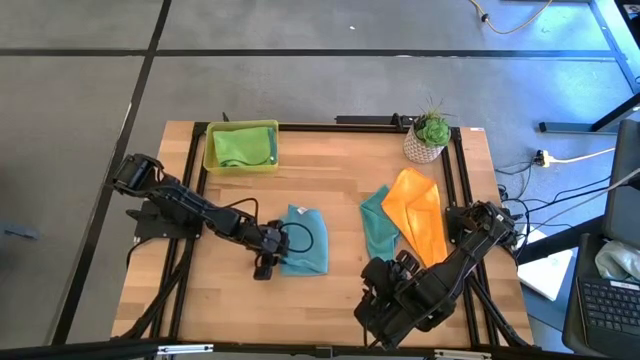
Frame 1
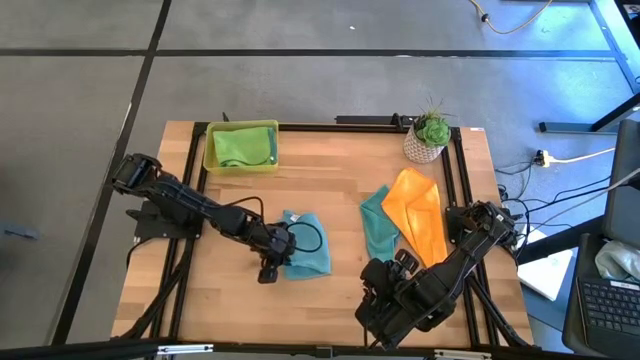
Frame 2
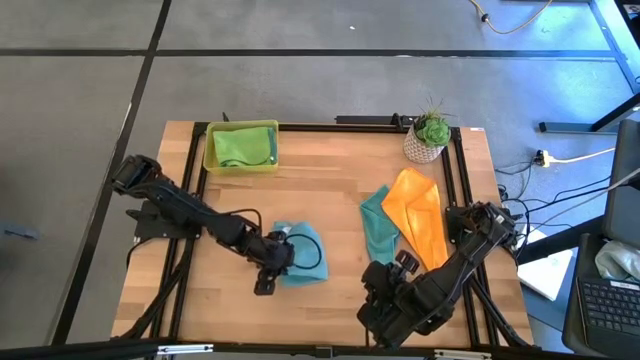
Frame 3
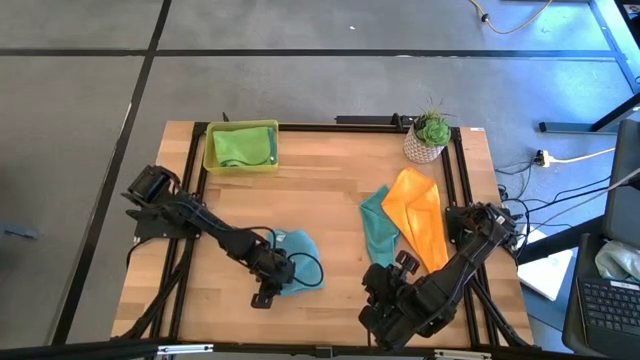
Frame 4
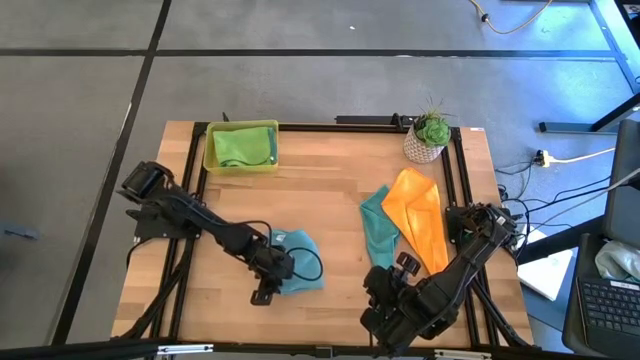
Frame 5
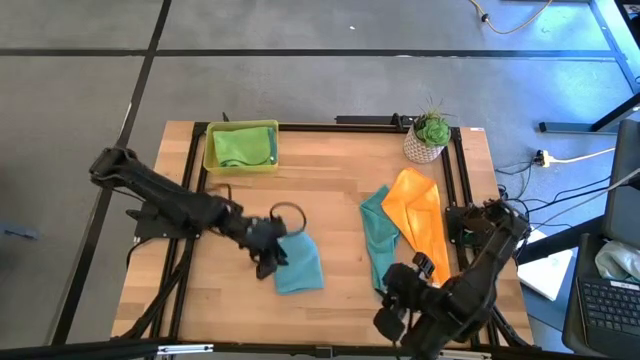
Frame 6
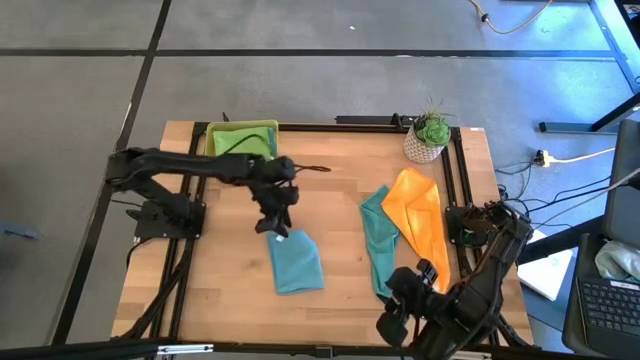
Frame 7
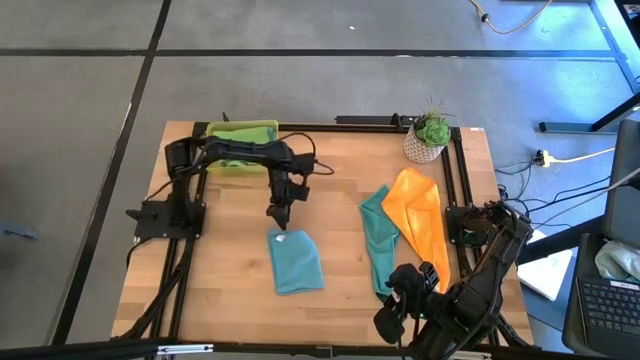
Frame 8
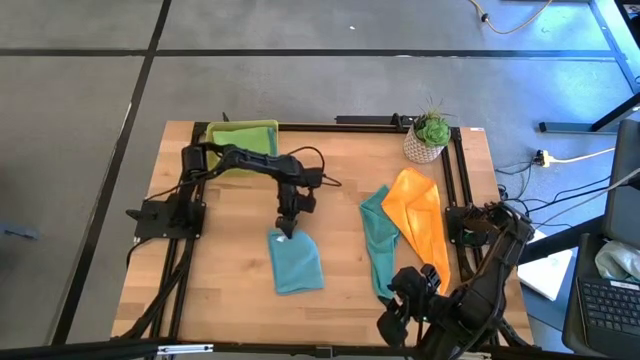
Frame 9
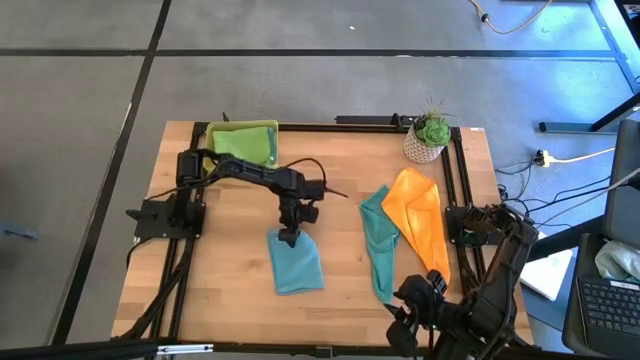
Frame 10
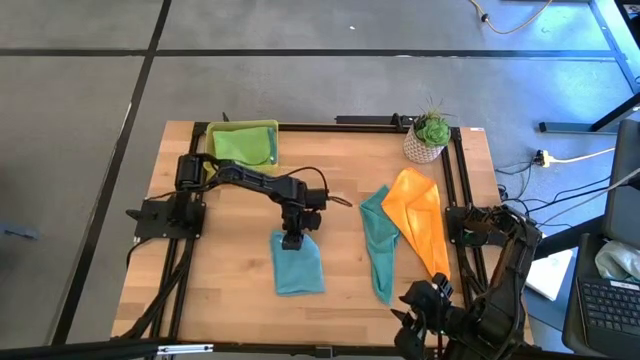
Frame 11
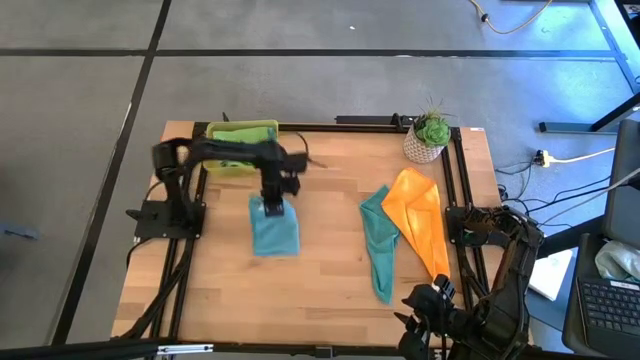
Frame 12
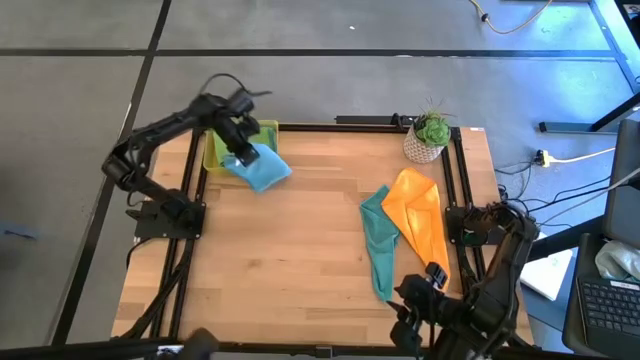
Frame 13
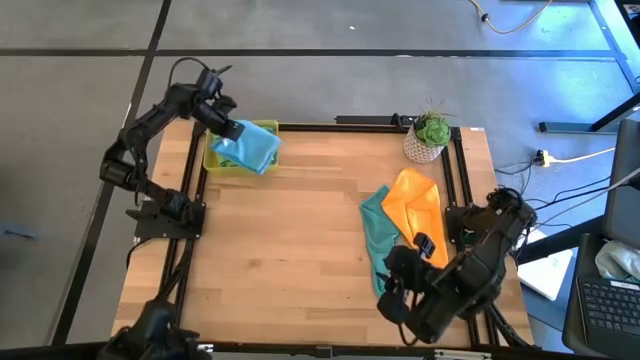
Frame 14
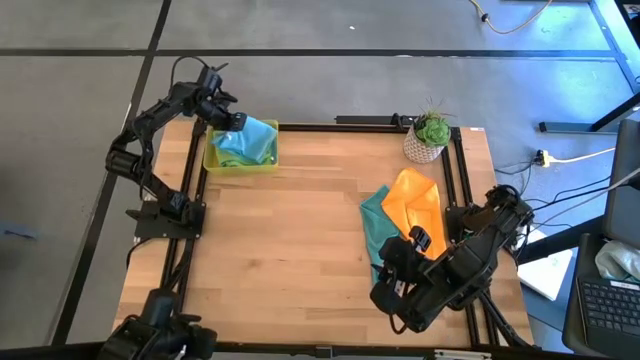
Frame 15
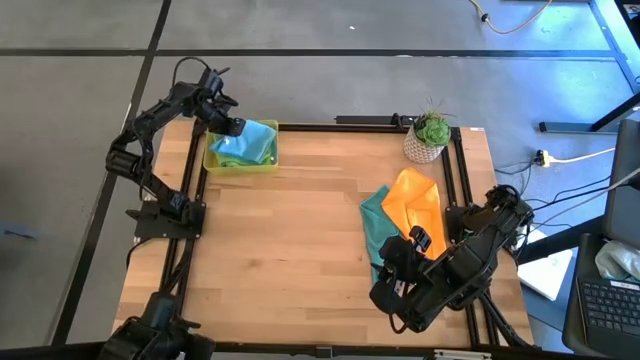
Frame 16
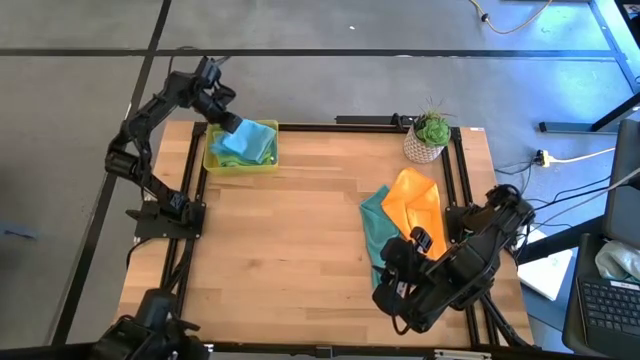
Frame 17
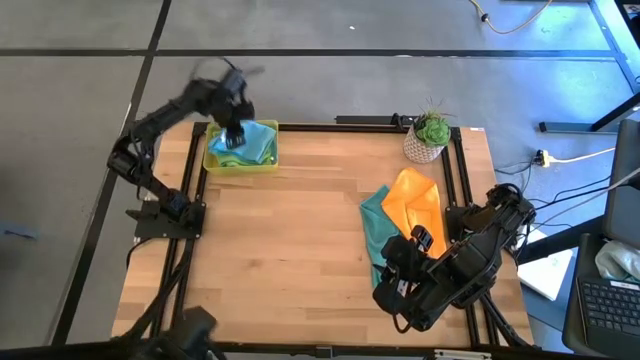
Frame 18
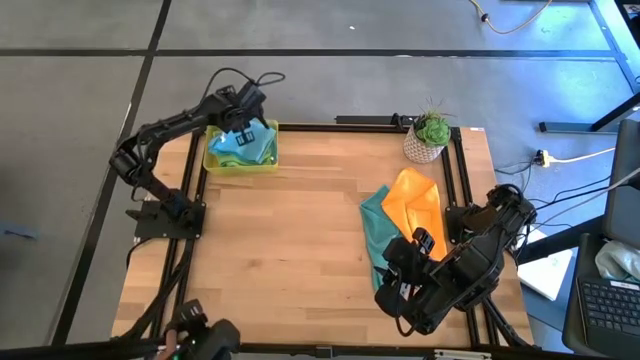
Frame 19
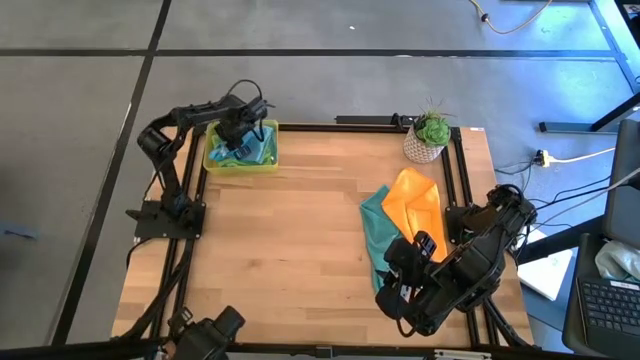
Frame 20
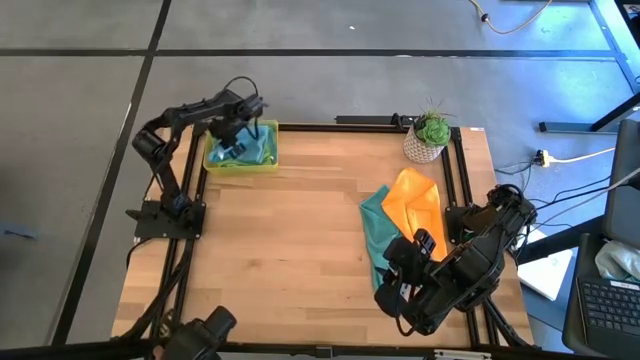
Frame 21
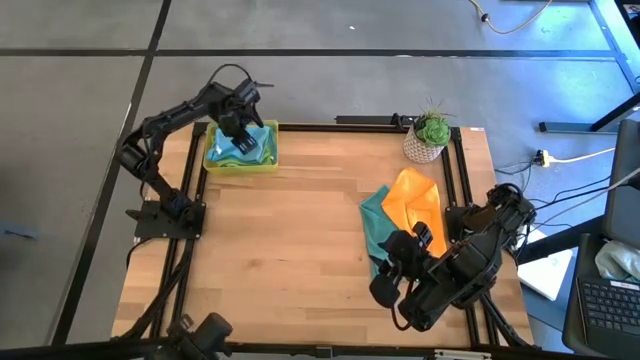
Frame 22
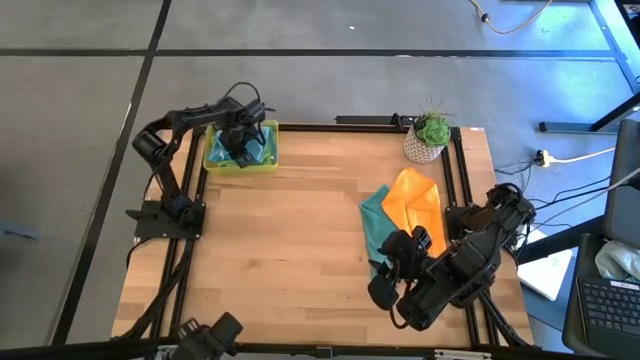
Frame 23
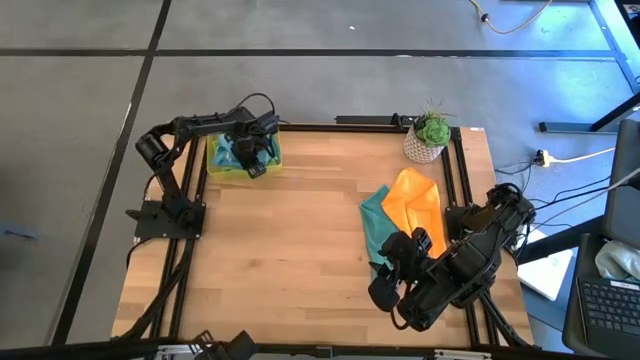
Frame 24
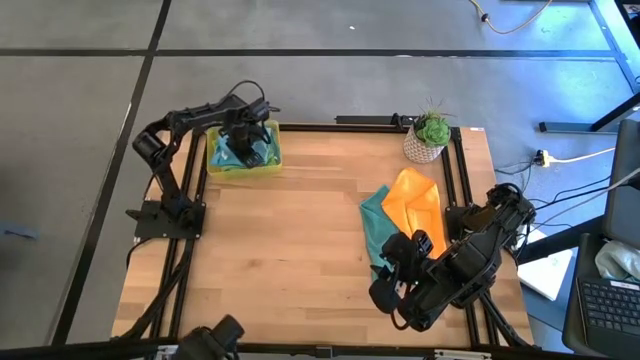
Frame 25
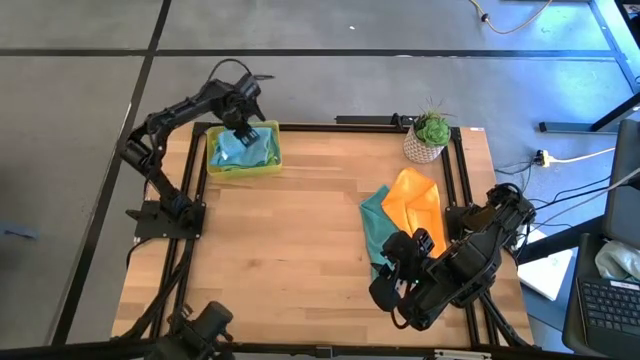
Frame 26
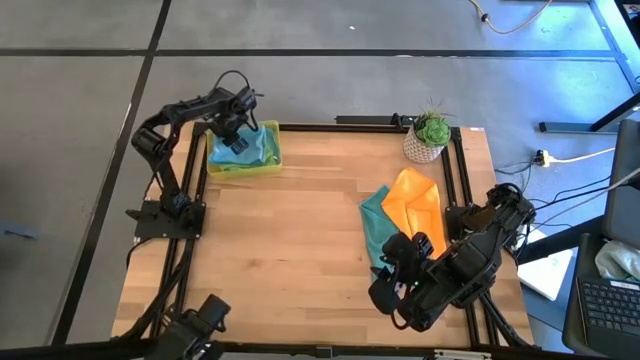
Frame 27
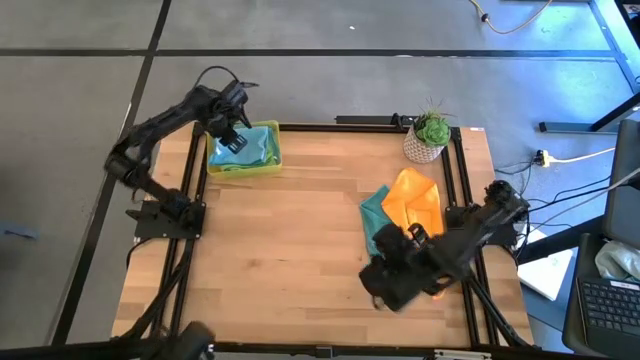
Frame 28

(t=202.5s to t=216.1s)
Task: Fold microfiber towels
Put the folded blue towel into the yellow bin

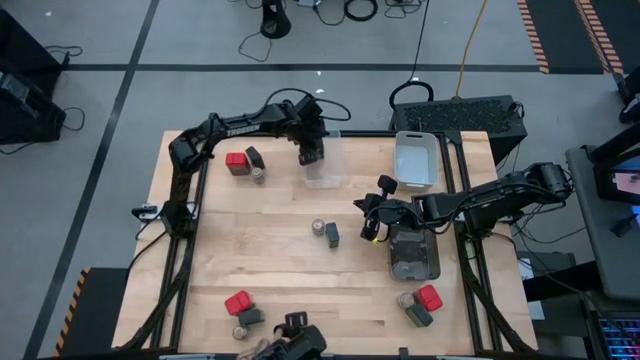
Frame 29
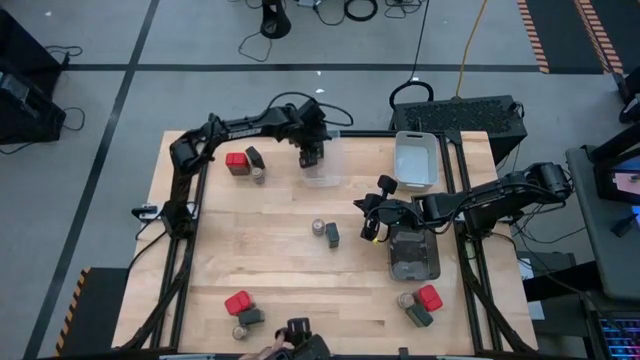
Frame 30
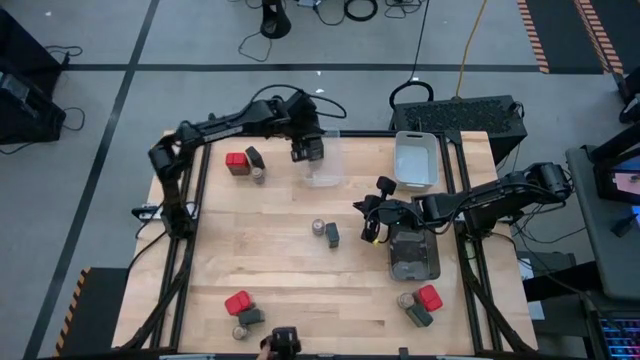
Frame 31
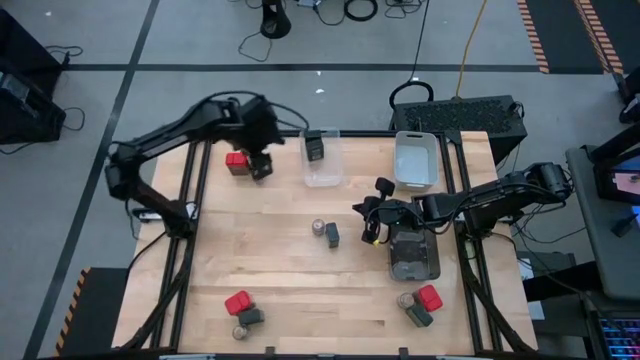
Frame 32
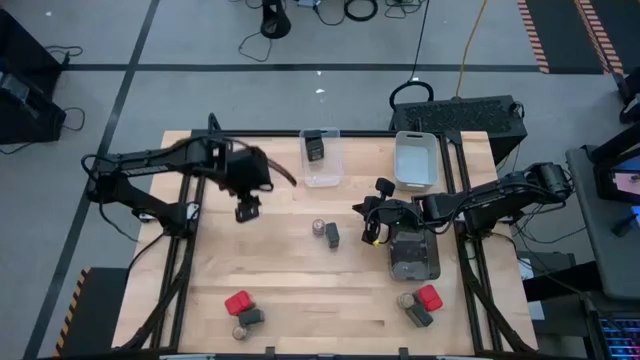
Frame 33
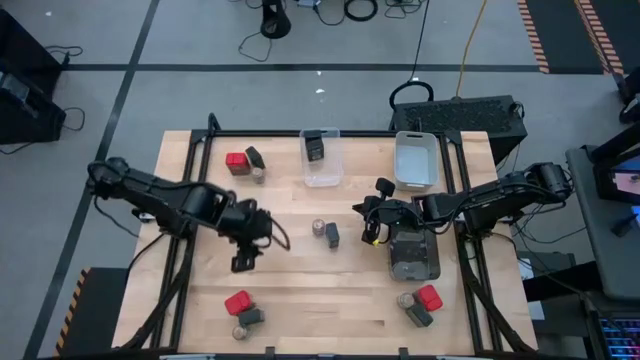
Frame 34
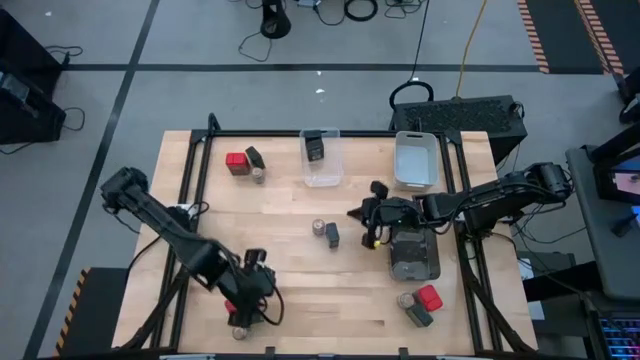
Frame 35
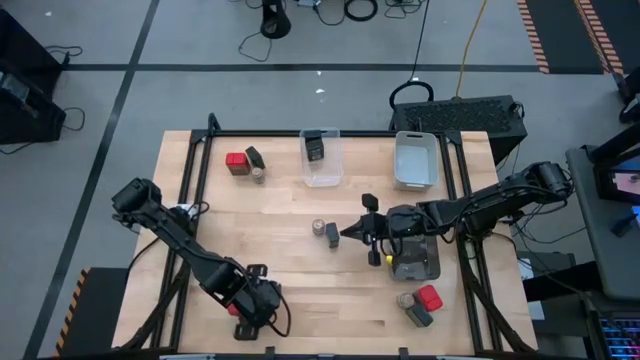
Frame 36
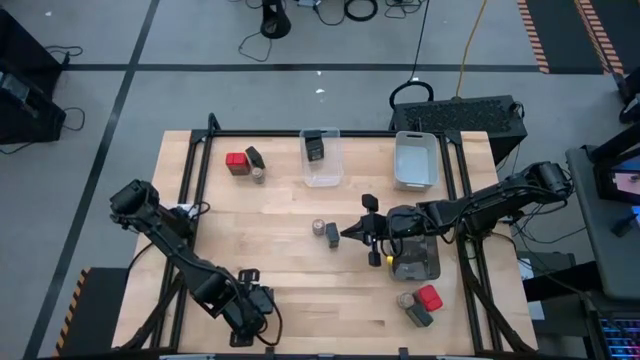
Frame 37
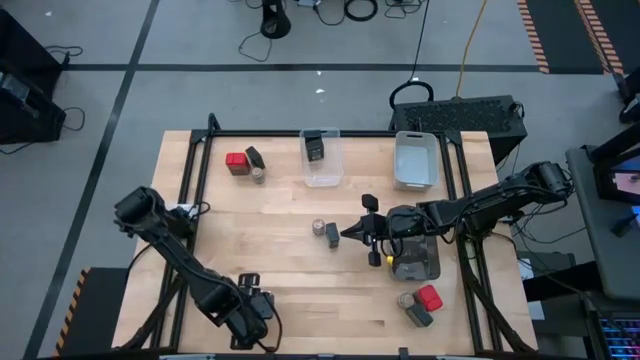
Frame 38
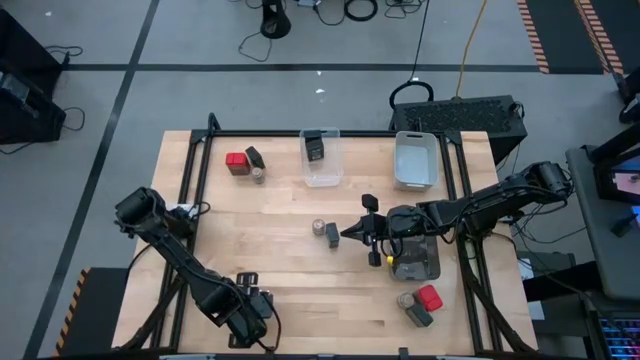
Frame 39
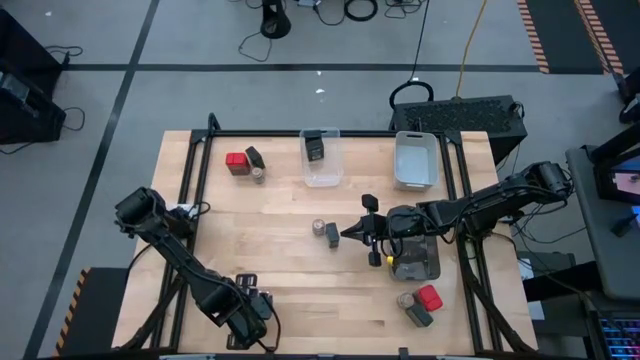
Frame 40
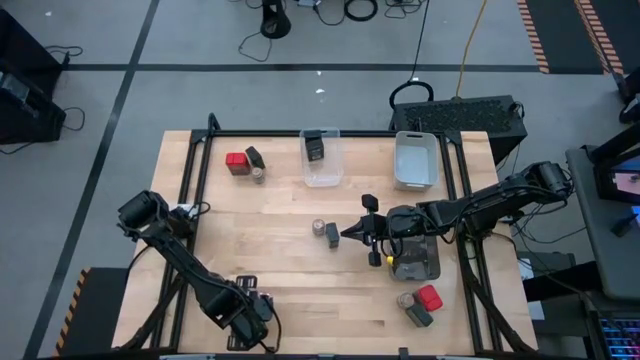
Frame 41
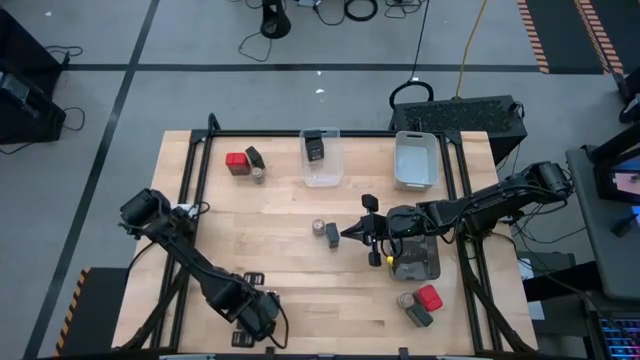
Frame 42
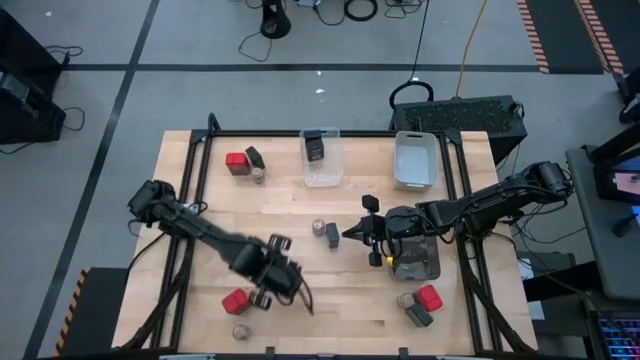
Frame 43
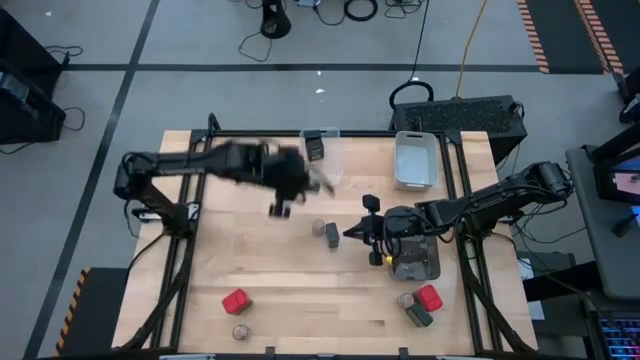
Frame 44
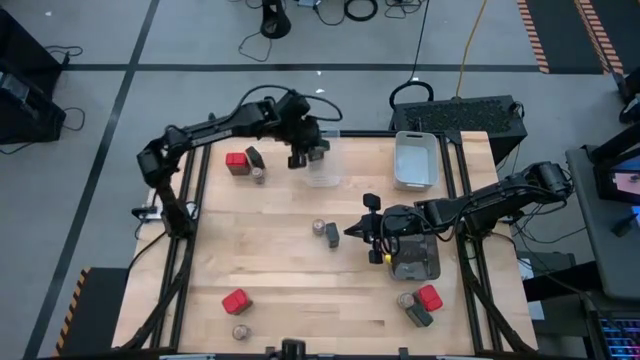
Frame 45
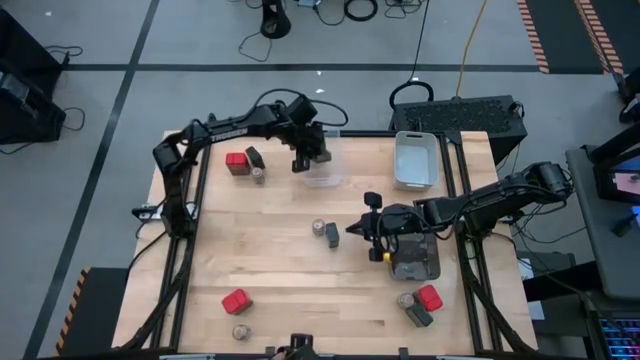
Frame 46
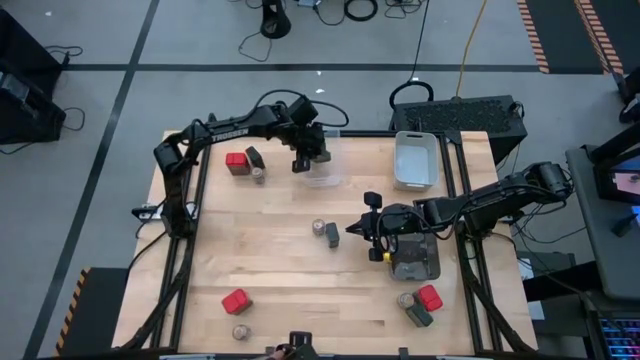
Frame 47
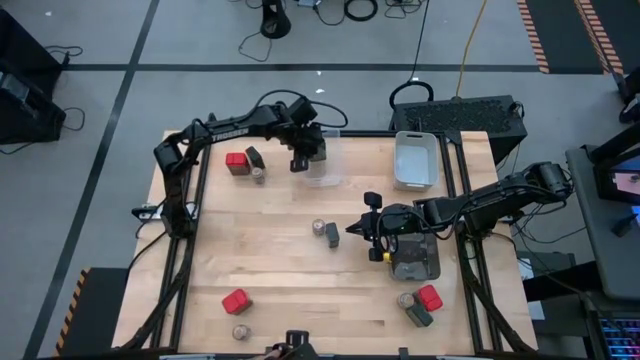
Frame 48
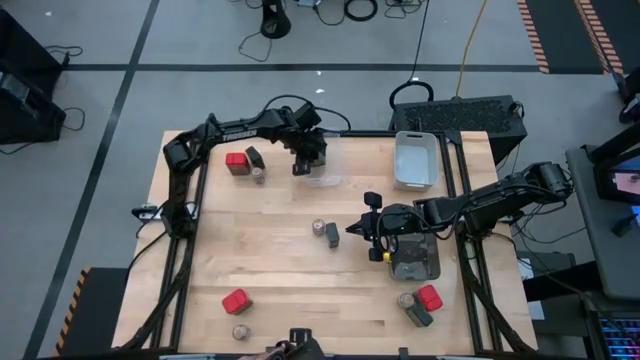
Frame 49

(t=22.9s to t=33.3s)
Task: Sort spices by type
Put the black seasoning can into the transparent bin
